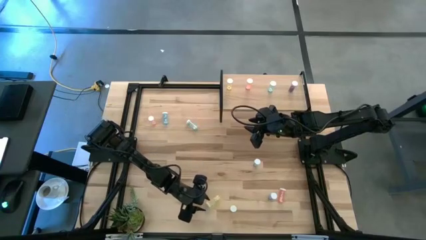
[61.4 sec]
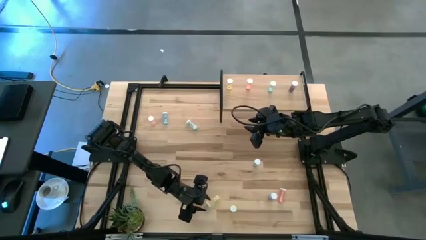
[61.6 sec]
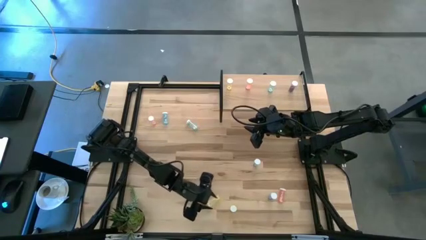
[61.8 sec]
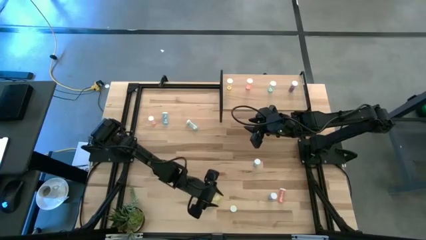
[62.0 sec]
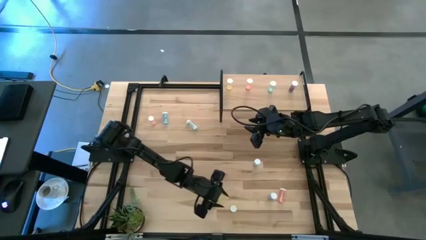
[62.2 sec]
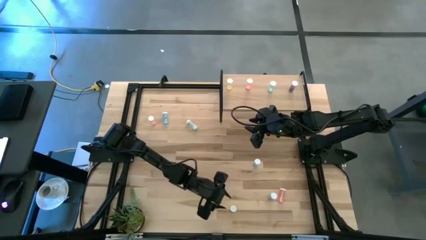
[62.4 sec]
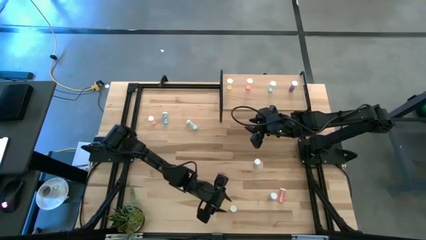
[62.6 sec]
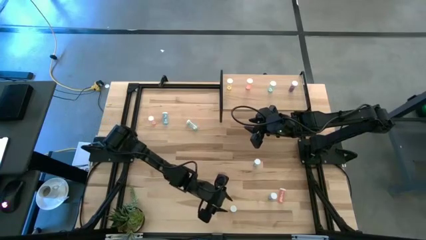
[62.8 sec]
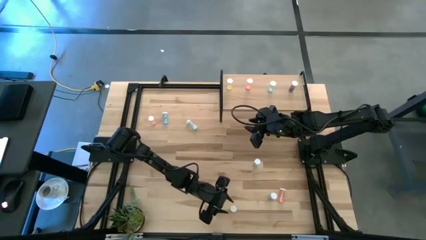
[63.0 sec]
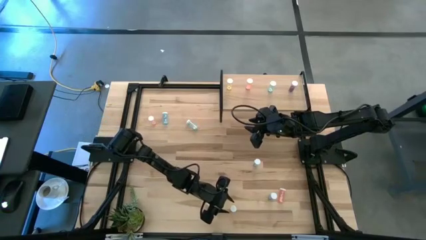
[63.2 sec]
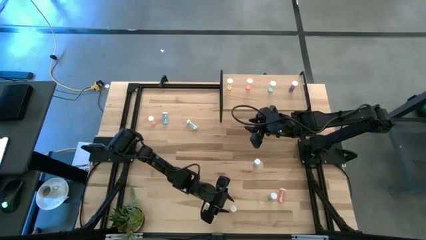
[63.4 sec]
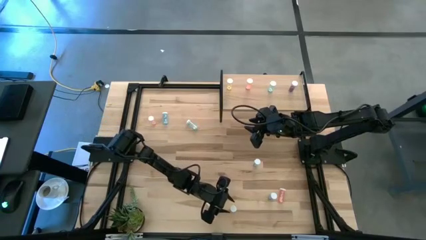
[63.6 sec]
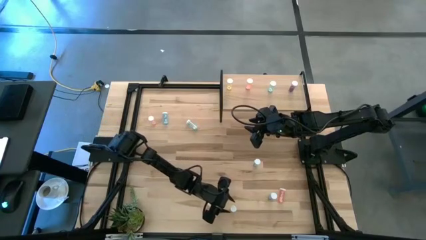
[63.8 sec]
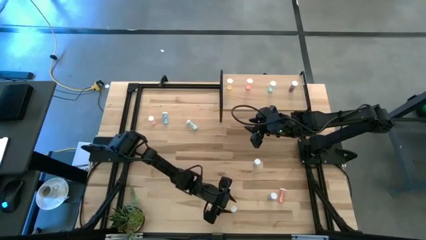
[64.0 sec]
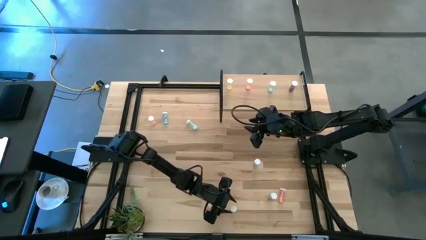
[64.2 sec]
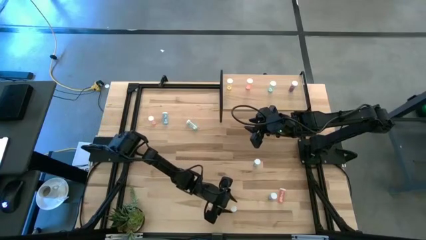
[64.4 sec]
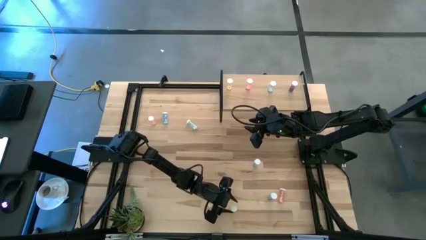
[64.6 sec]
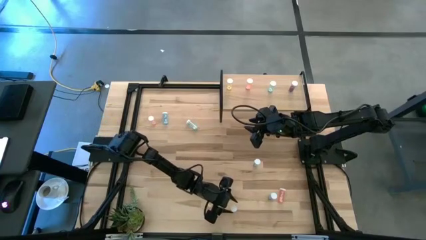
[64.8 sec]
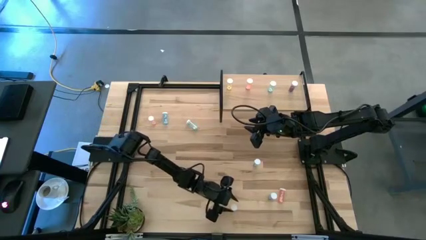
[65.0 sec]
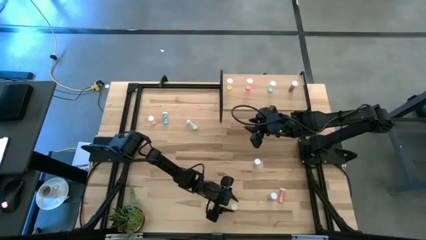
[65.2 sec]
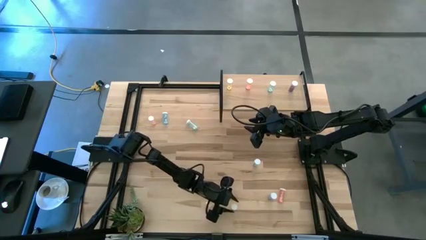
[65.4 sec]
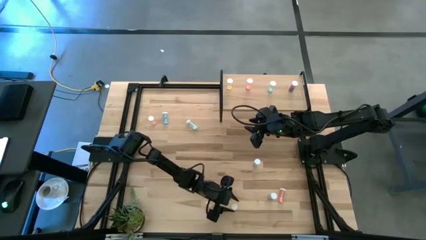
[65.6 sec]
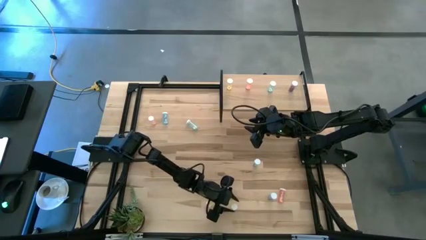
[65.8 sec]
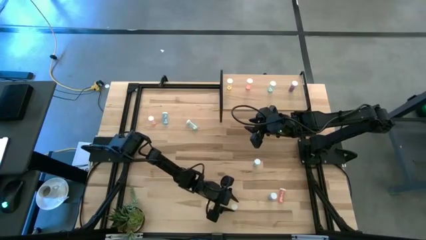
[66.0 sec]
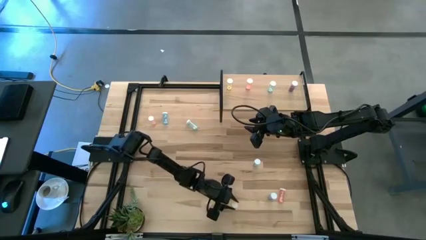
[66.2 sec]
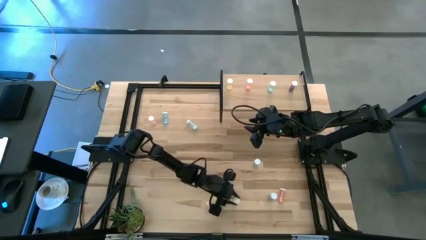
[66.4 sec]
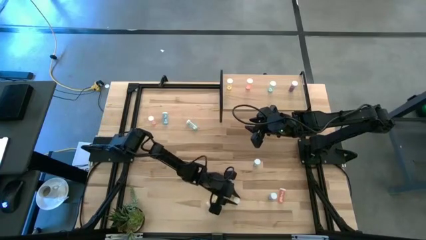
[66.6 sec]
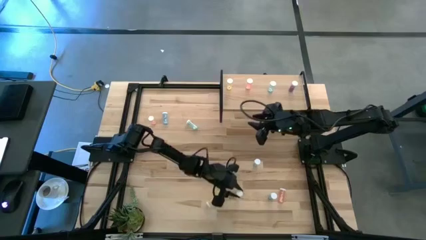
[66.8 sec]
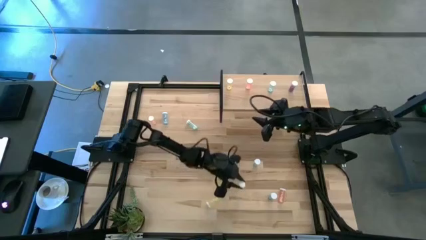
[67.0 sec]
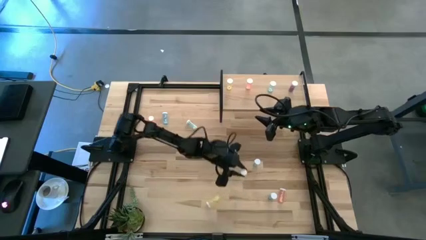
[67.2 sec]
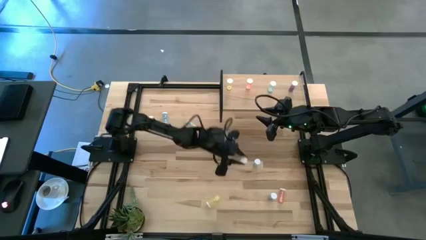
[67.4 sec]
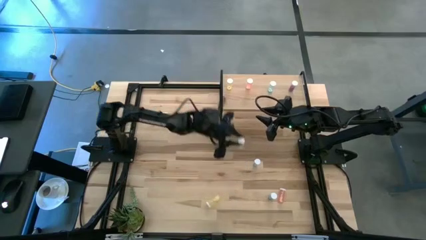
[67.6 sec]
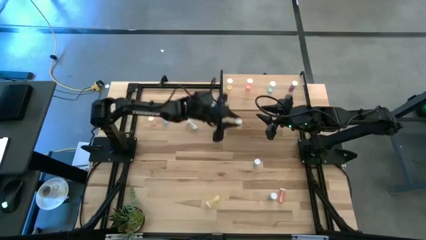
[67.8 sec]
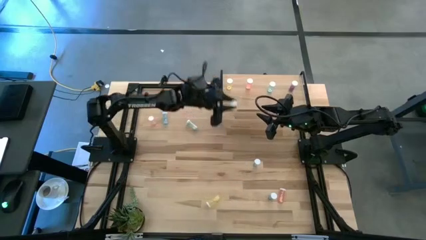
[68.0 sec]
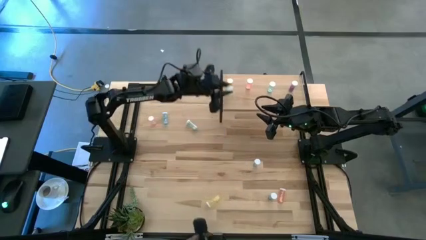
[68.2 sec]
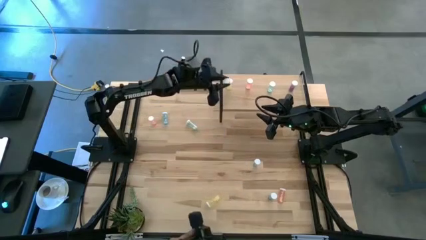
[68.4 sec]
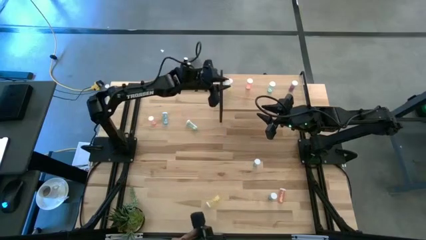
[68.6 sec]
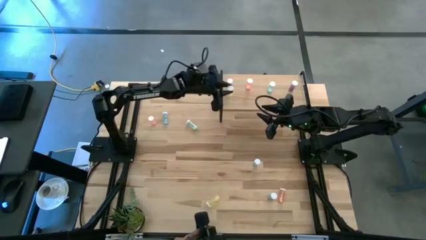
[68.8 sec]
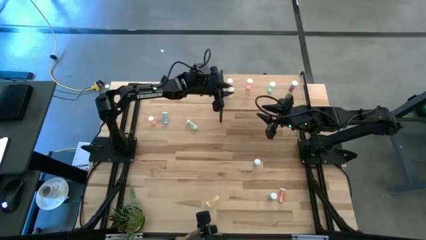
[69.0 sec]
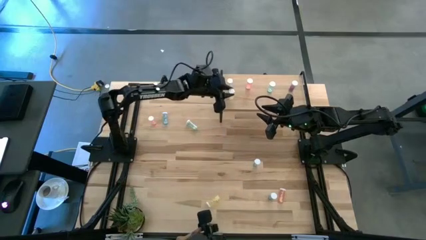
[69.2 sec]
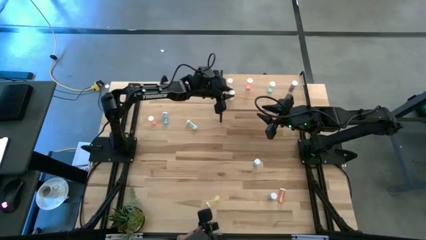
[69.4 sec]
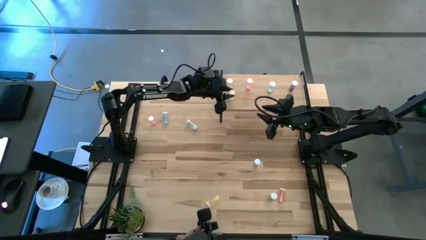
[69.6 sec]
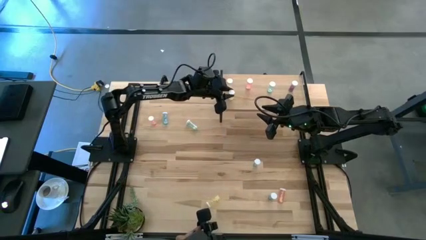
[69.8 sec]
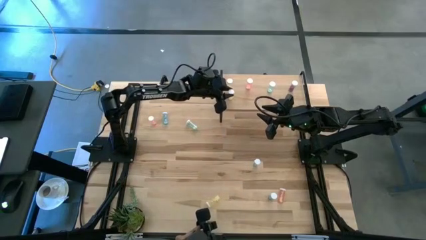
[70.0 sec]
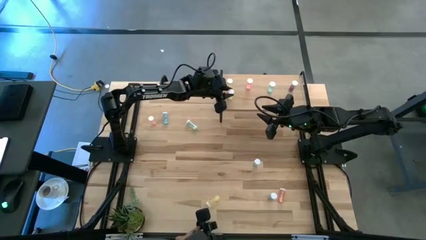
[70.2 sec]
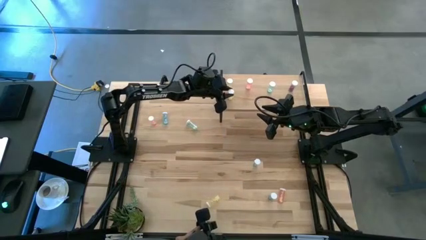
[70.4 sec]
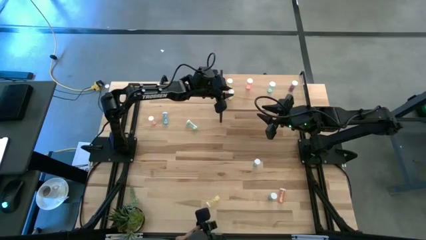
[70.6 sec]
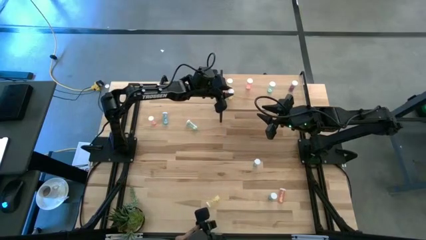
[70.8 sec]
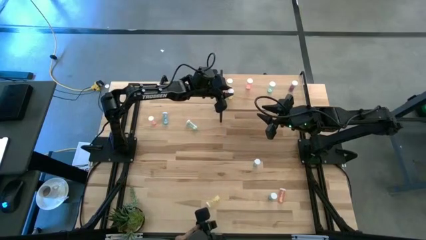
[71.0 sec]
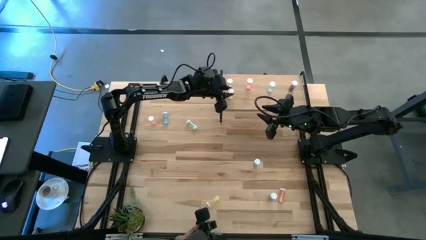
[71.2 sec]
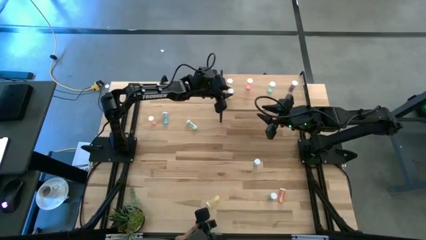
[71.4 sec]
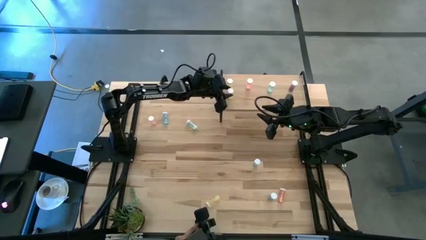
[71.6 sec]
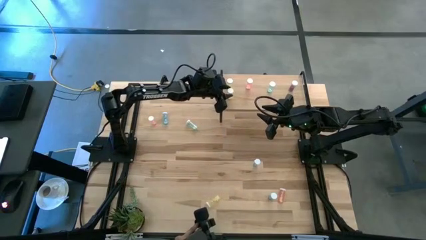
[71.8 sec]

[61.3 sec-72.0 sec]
Task: Pick and place medicine bottles onto shelf by color
Put the right yellow pill bottle on the shelf aligned with the other yellow pill bottle

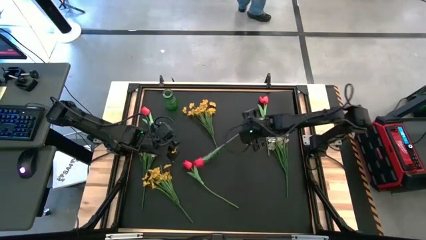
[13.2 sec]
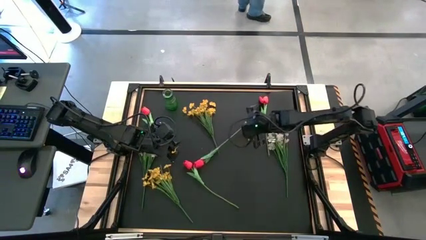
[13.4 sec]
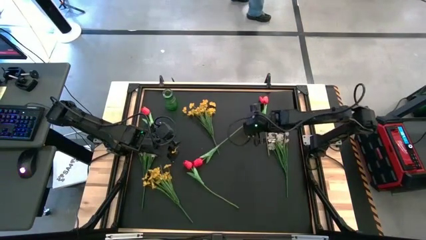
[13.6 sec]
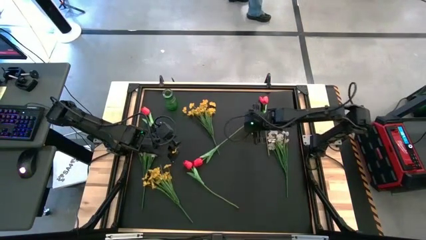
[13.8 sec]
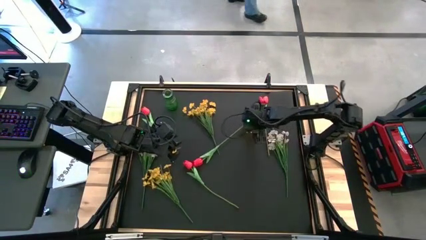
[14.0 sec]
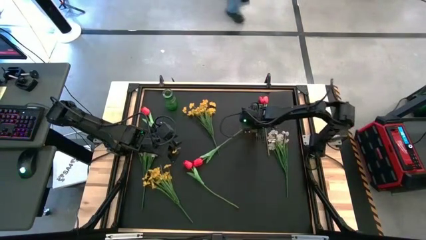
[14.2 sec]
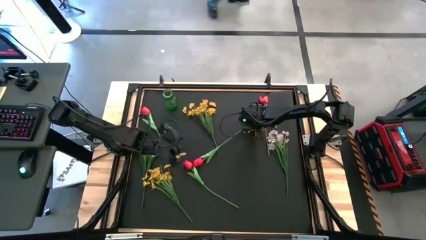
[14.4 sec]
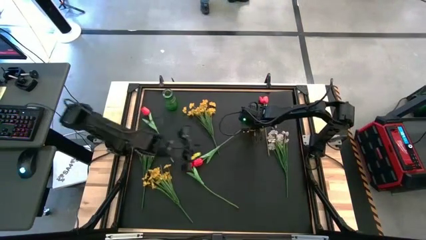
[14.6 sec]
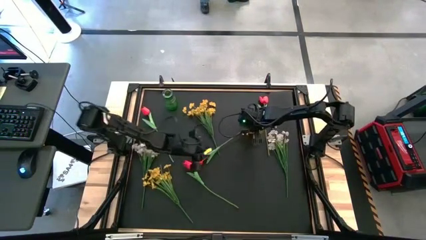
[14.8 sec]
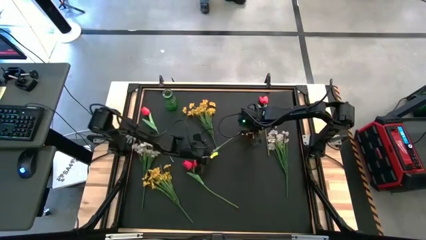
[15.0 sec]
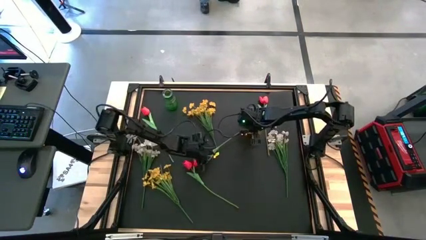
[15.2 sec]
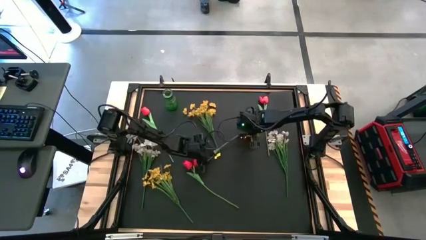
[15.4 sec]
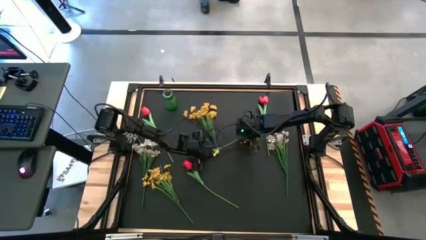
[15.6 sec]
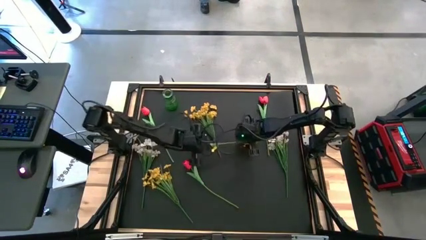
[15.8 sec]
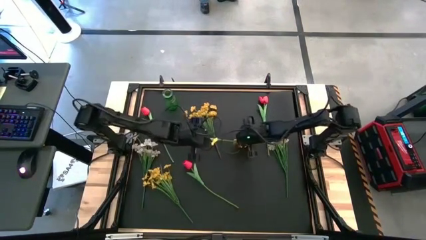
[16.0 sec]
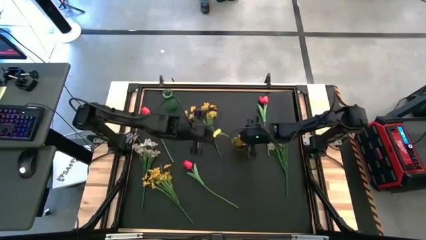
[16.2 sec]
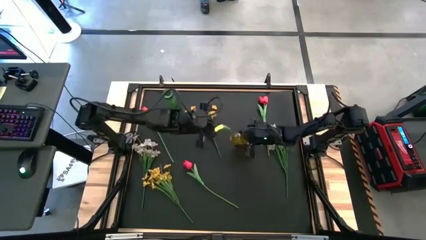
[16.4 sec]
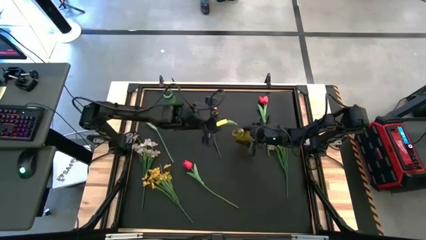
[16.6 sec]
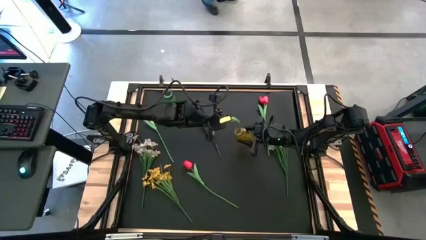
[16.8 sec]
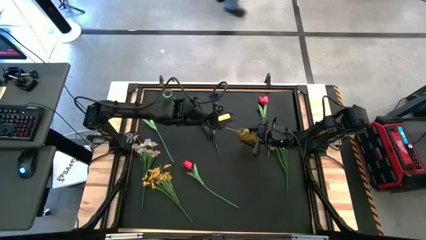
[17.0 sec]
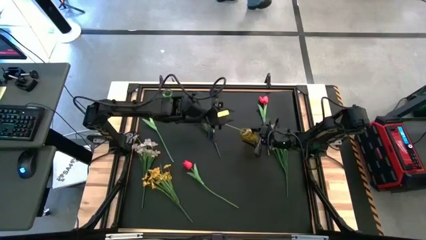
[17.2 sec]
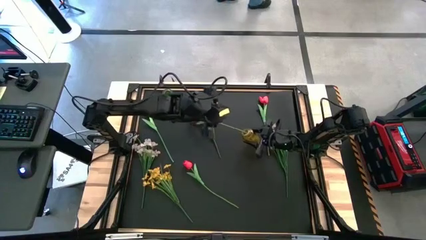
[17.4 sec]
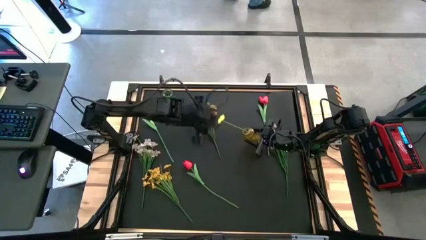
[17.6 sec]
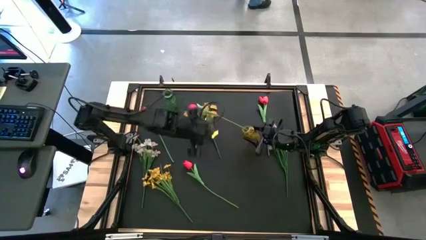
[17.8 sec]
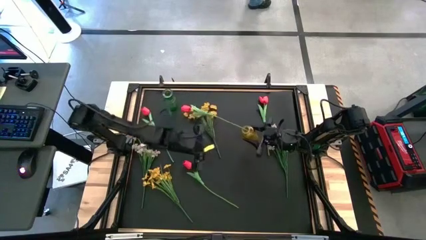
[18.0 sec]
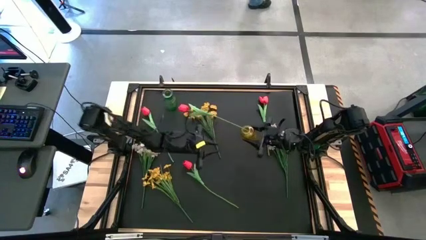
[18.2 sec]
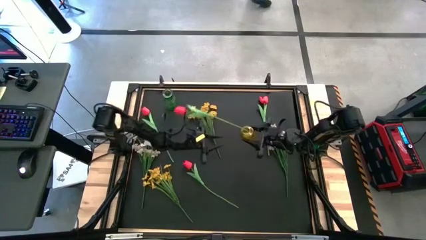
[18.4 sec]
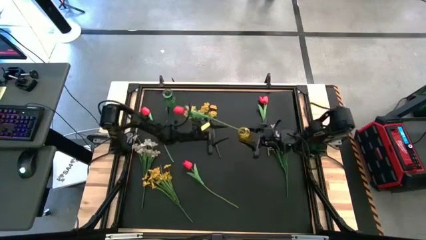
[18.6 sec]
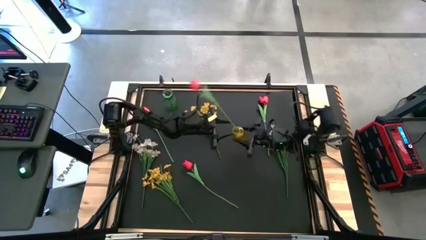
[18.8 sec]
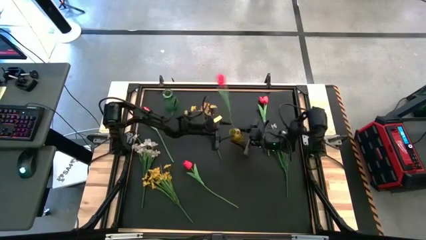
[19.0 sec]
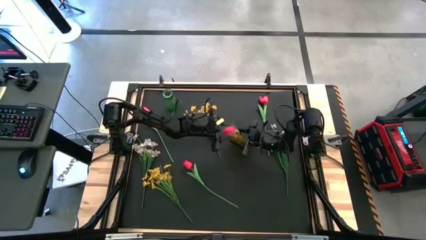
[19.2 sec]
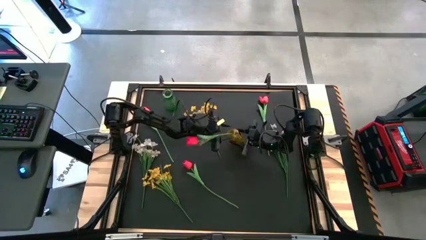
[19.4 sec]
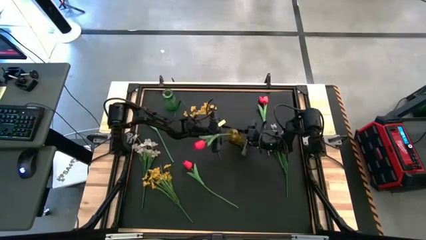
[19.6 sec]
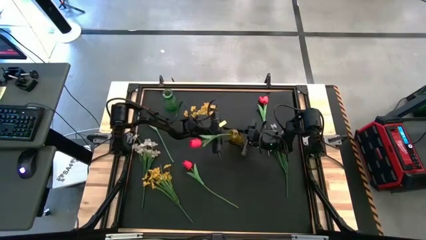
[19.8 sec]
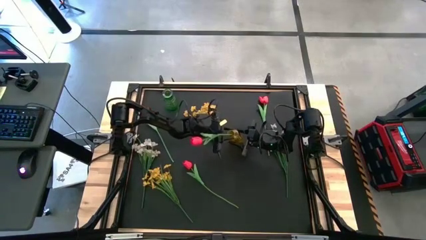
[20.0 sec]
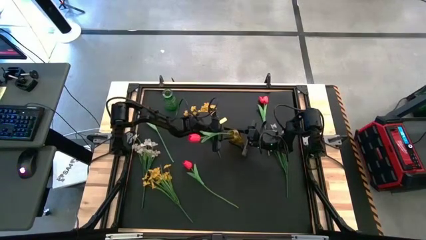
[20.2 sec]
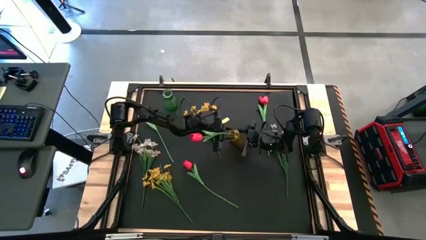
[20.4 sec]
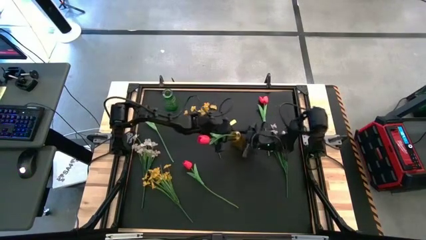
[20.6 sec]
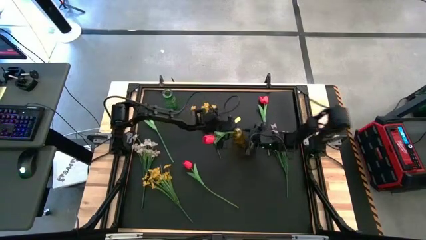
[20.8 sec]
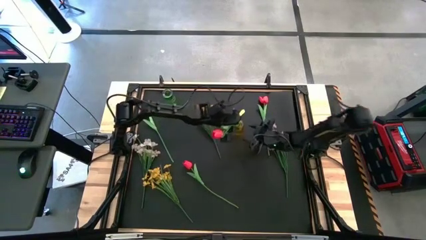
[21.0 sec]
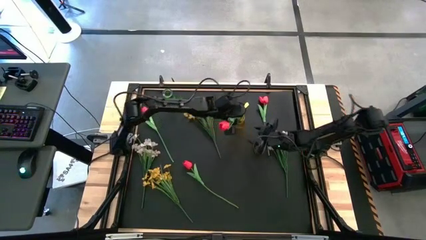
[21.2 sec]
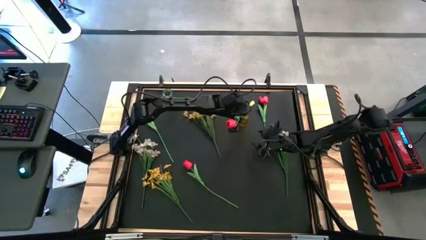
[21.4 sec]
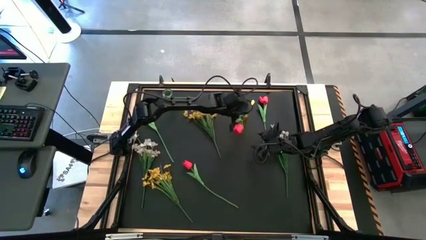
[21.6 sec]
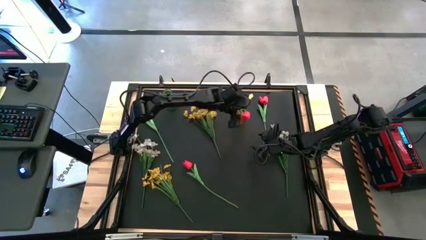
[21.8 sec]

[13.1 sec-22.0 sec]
Task: Sort flowers into vase by color
Adjust the yellow vase
